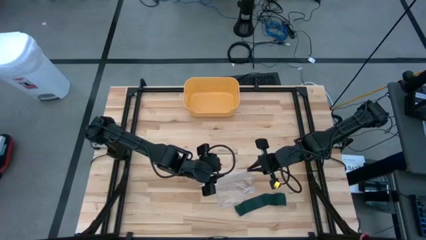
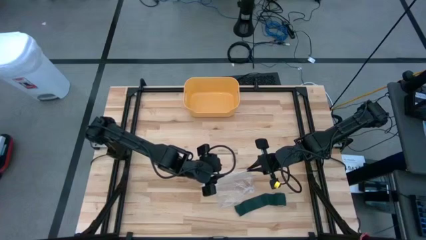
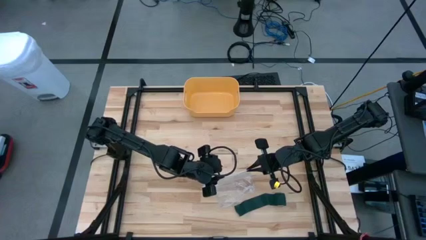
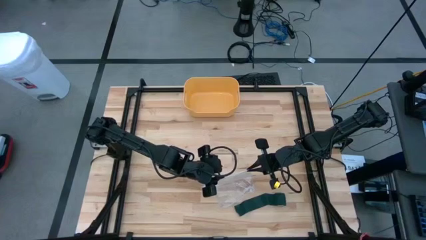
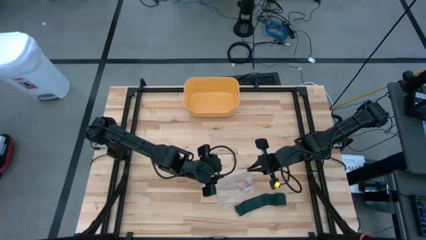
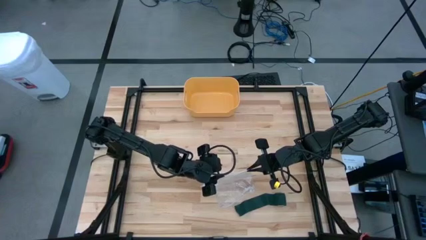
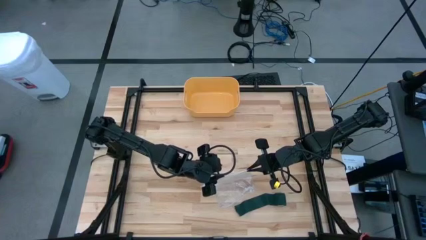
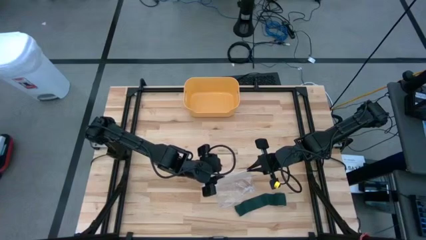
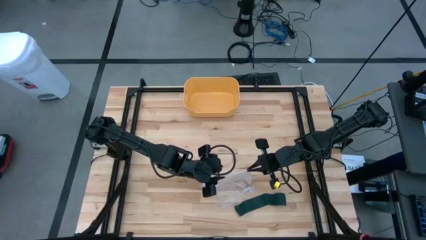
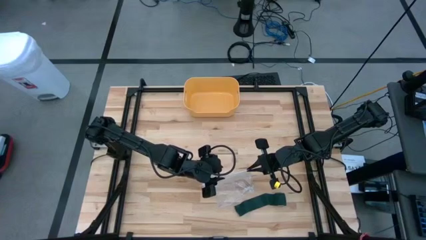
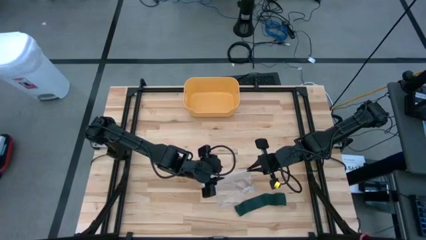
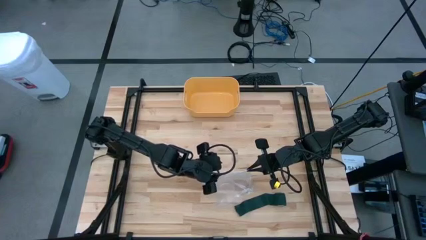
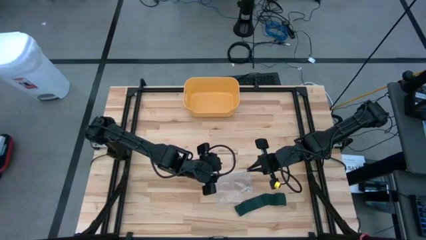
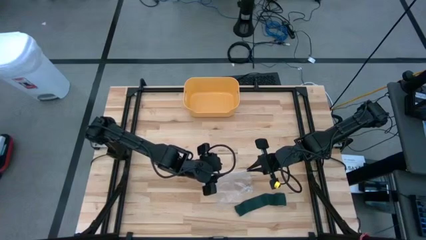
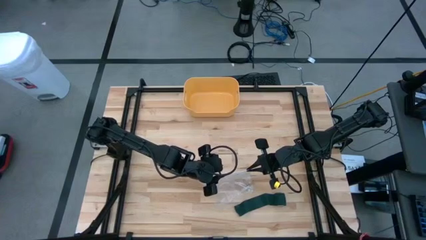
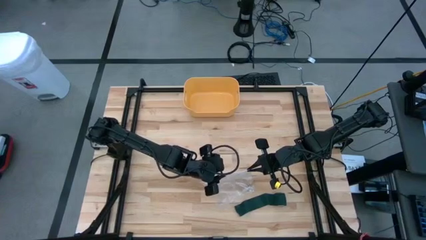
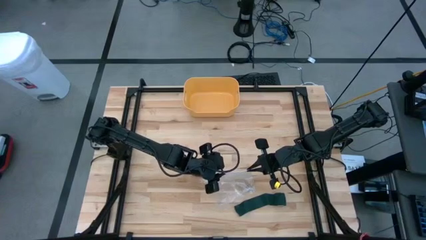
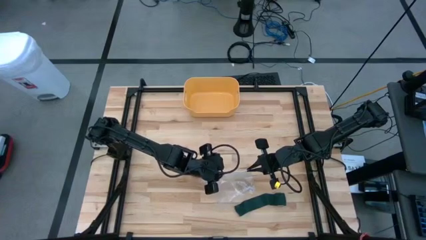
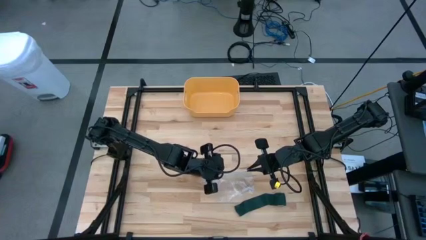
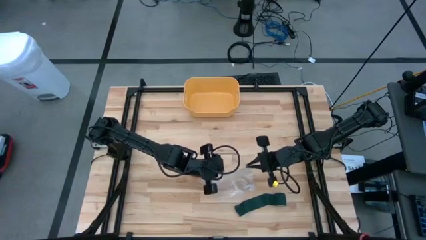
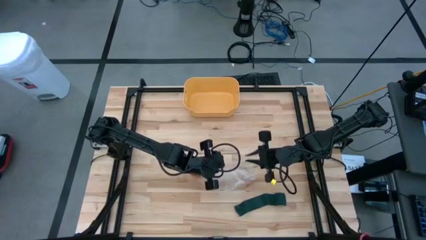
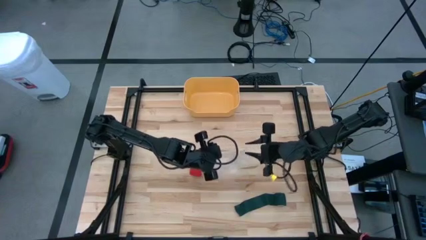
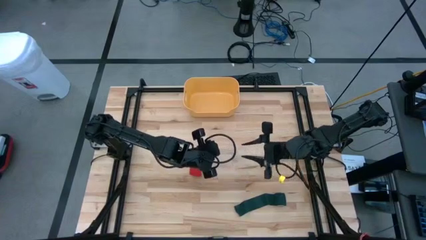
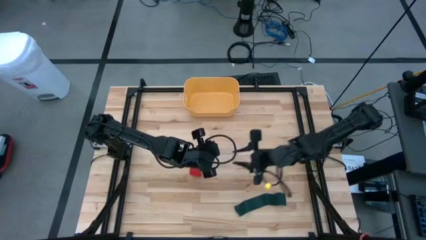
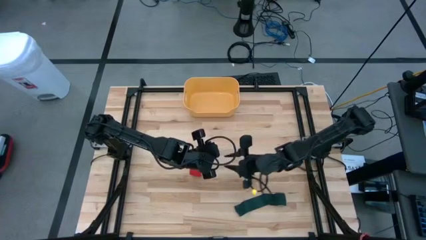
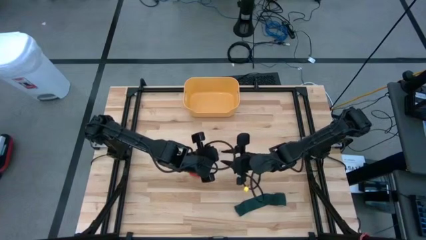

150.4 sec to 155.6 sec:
Task: Roll bandage
Open the transparent zip bag

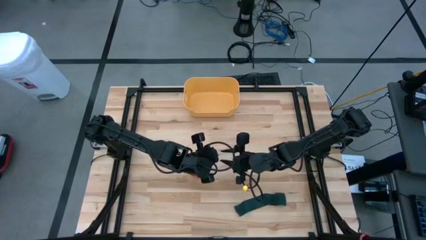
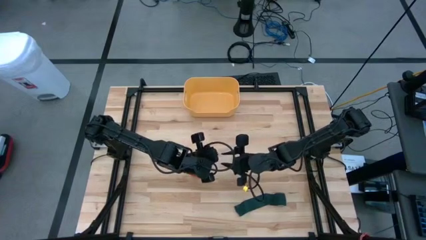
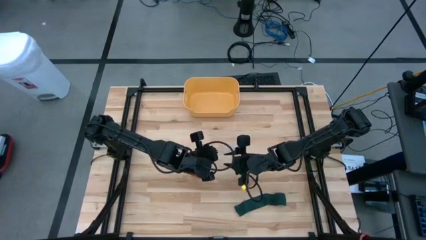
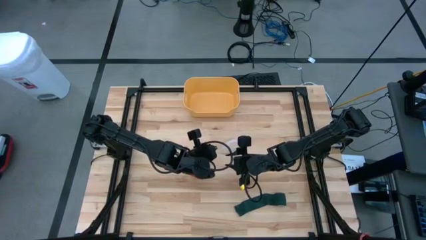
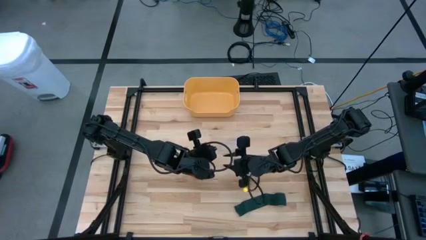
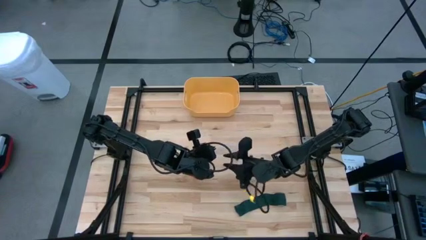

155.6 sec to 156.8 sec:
Open the transparent zip bag

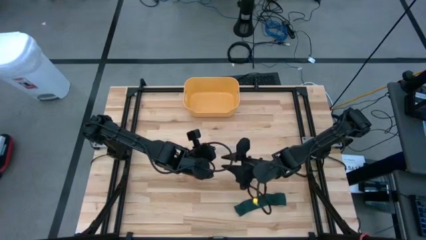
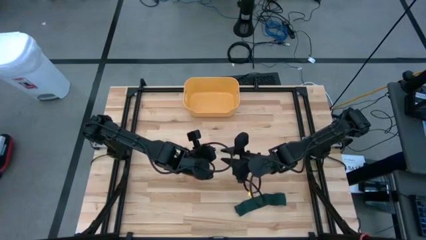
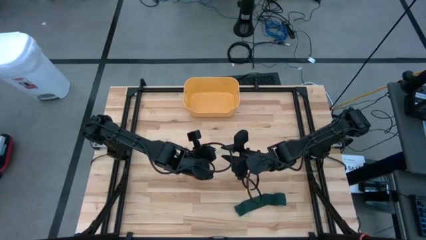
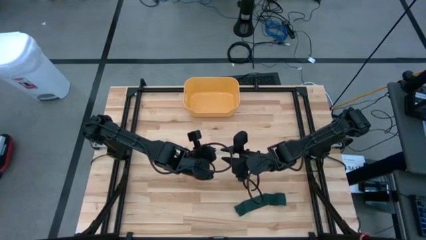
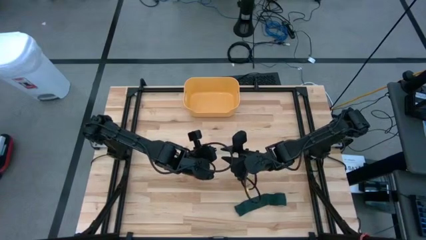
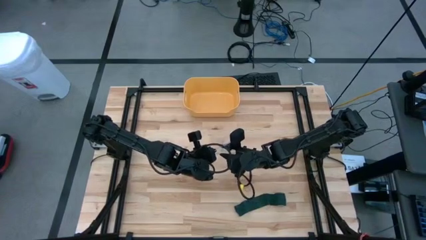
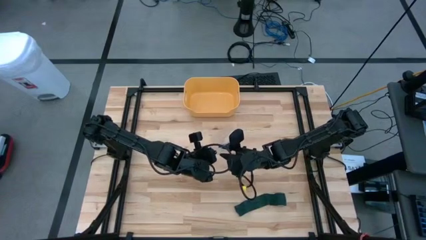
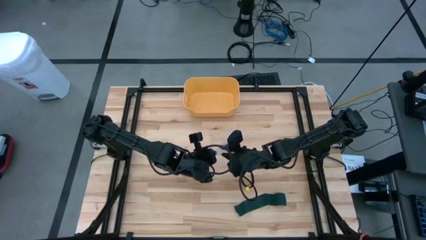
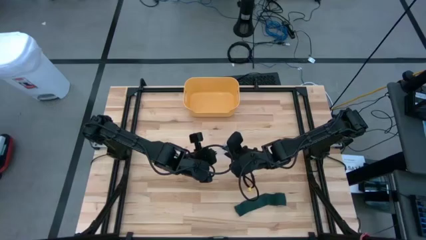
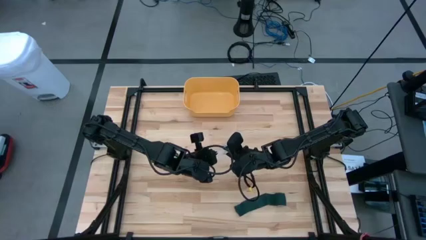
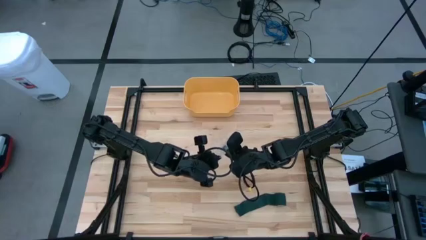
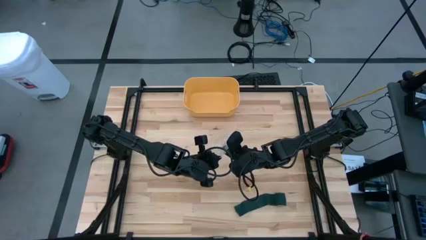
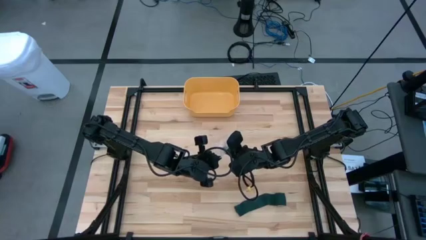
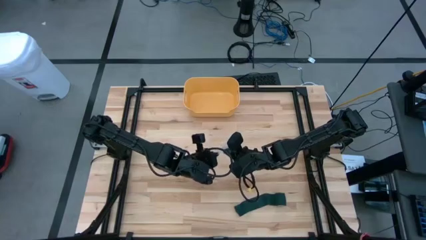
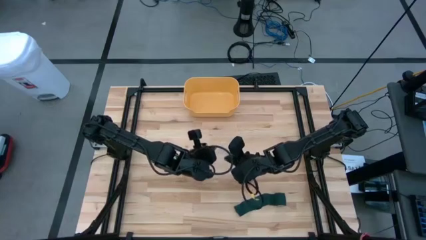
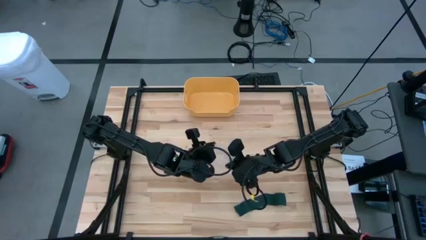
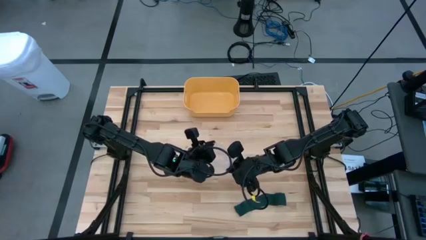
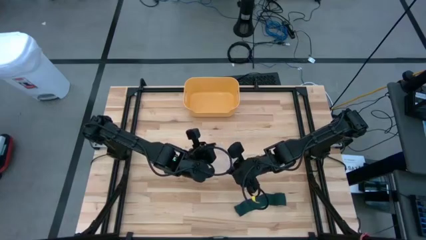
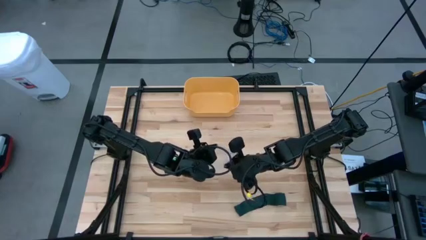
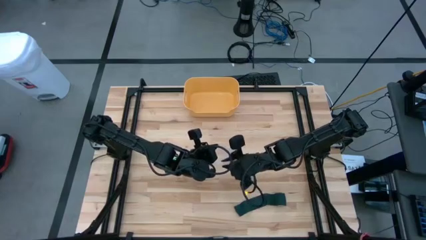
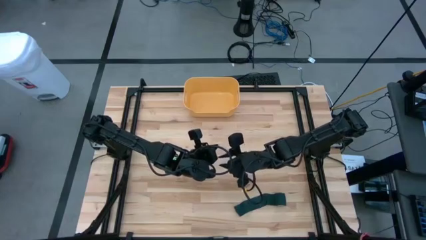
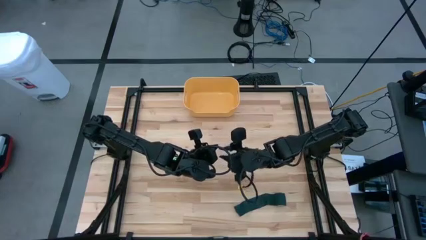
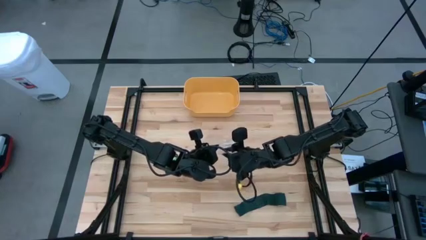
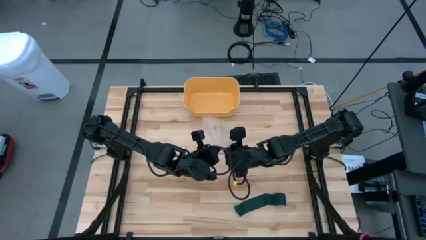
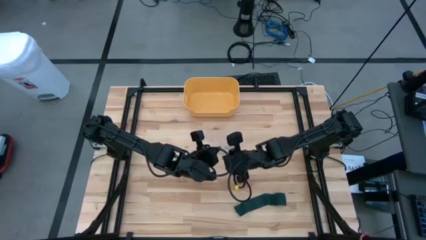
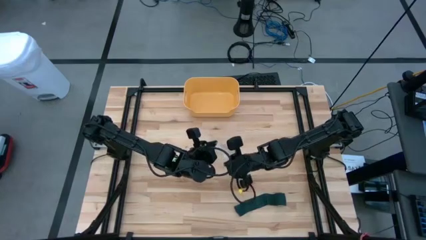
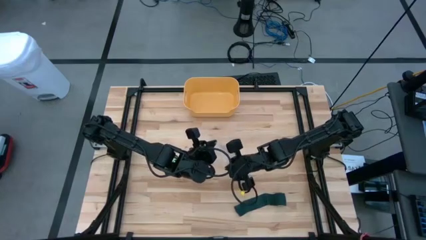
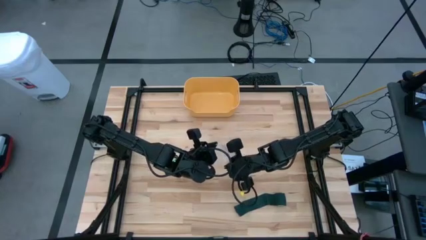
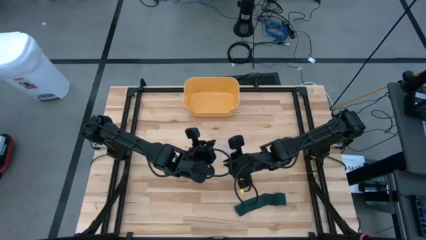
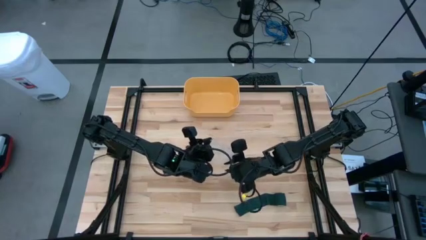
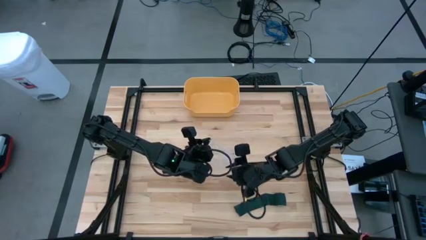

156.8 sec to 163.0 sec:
Open the transparent zip bag

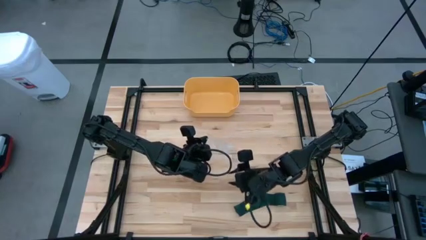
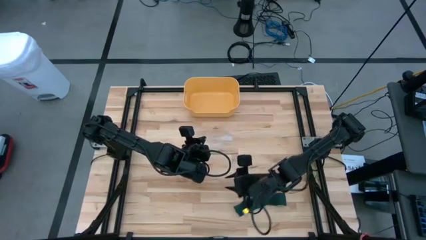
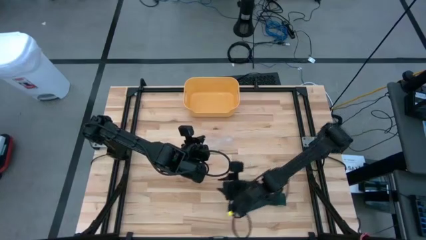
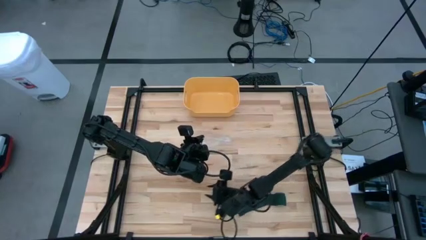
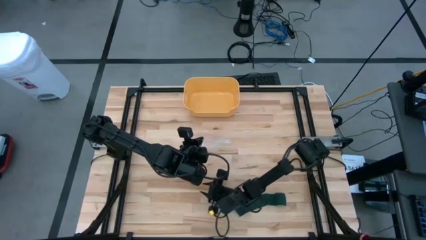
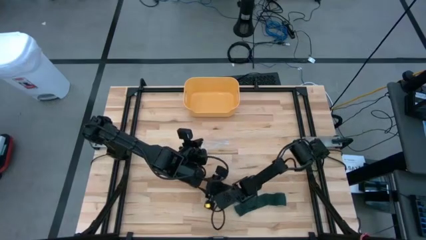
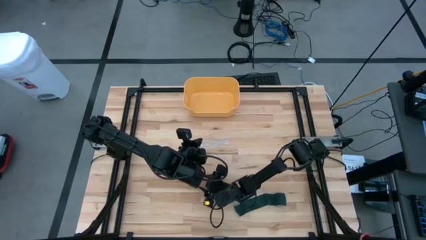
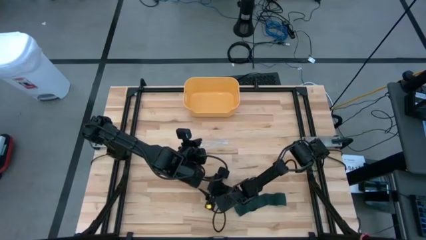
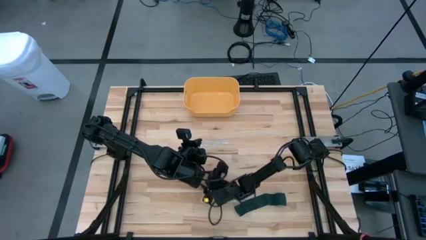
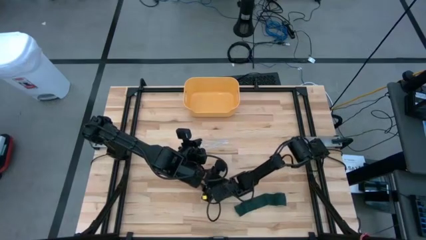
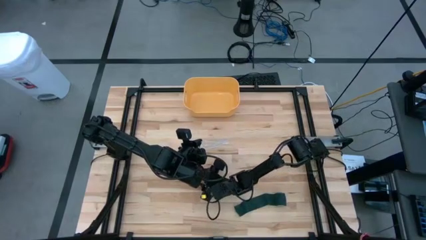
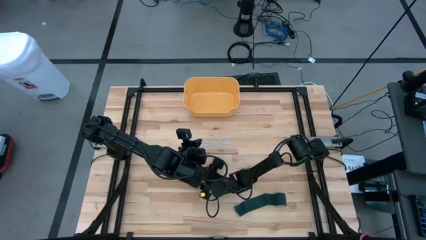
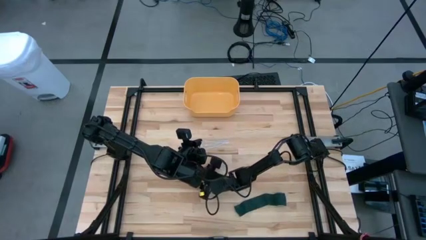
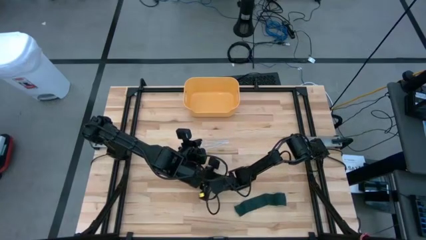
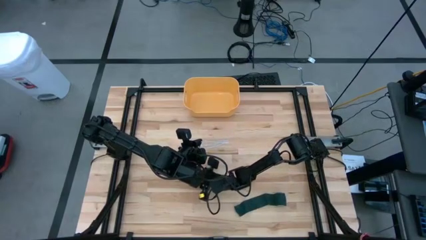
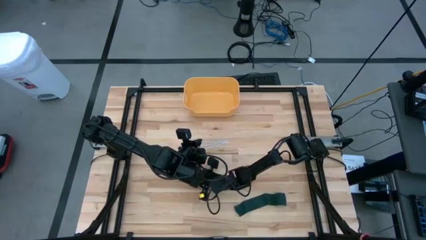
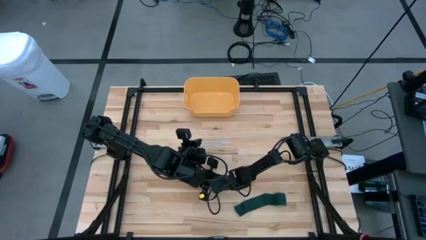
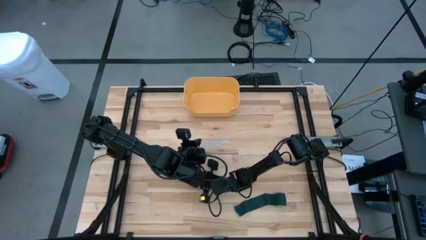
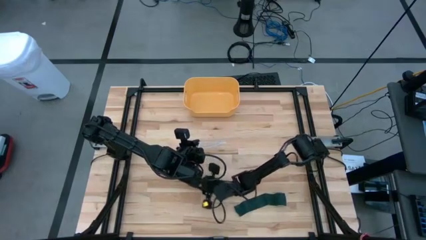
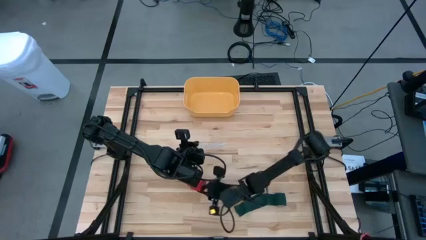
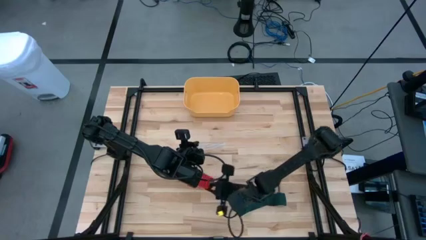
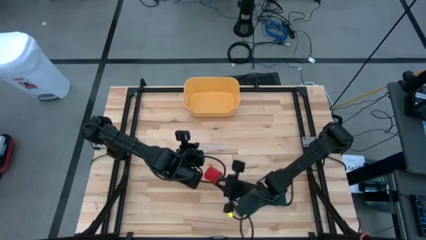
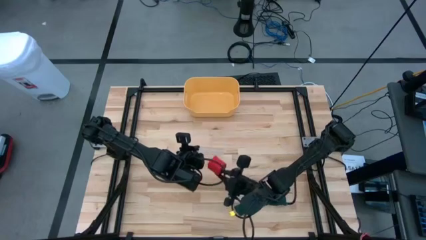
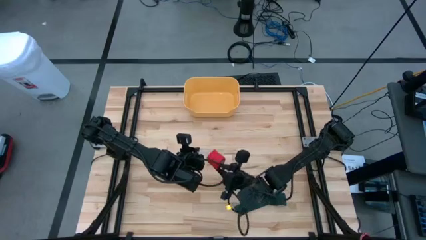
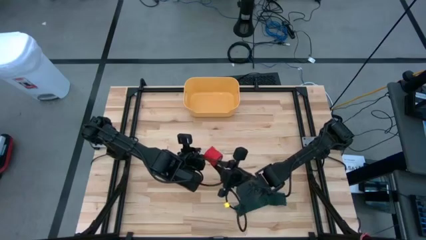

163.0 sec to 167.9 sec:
Put the rolled red bandage into the transparent zip bag
